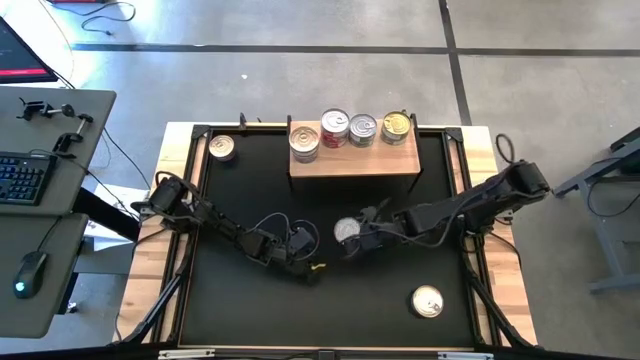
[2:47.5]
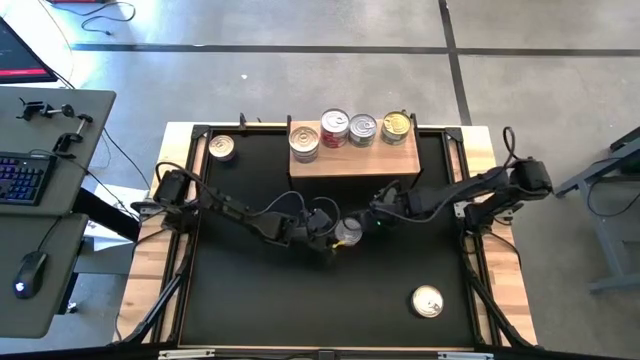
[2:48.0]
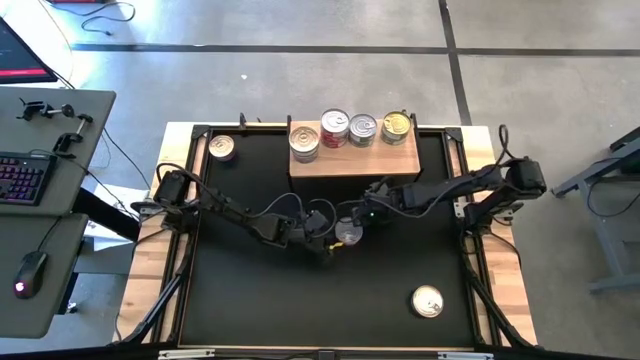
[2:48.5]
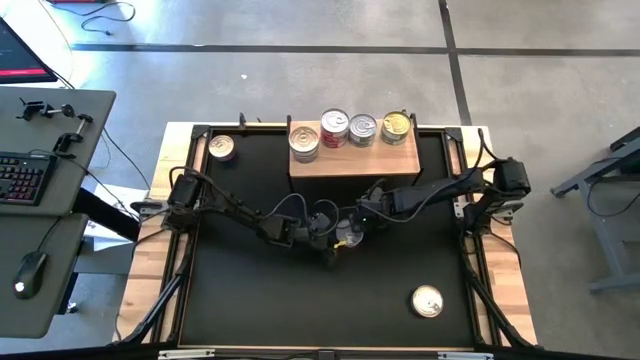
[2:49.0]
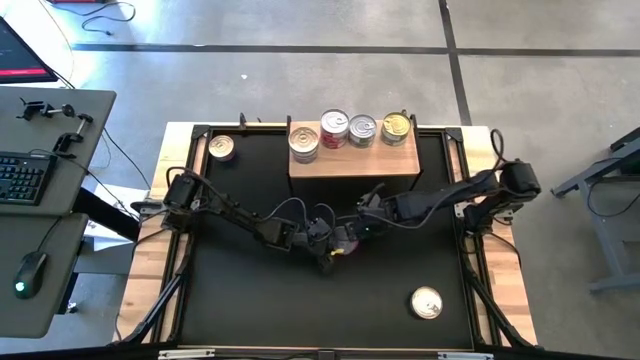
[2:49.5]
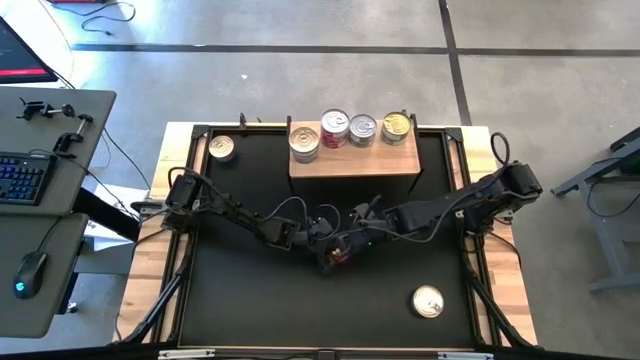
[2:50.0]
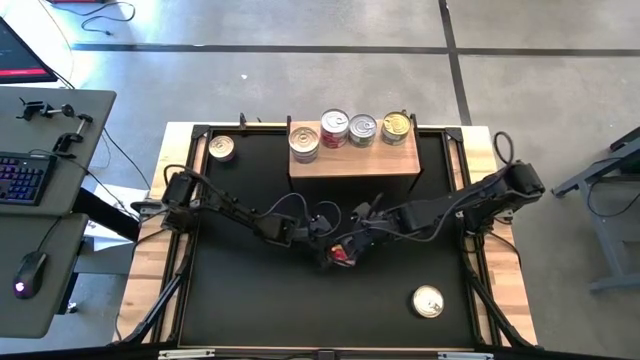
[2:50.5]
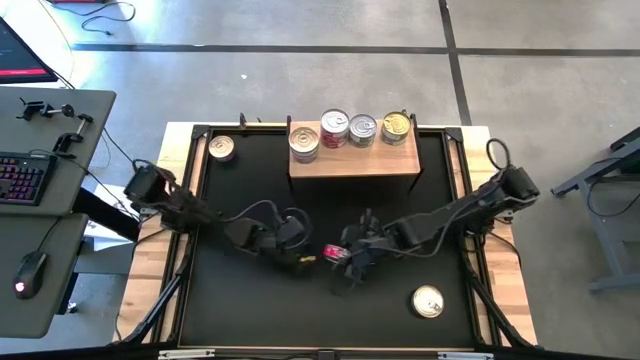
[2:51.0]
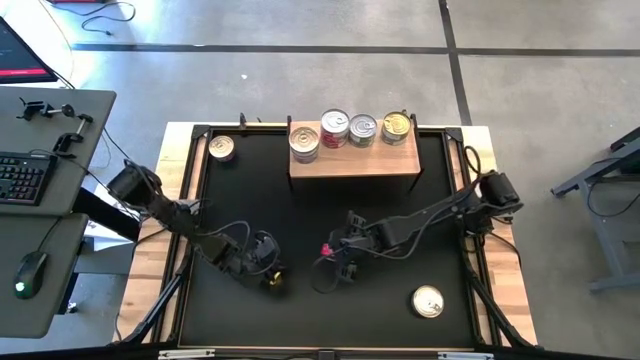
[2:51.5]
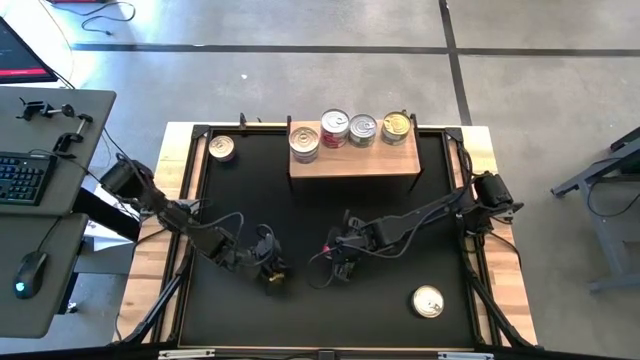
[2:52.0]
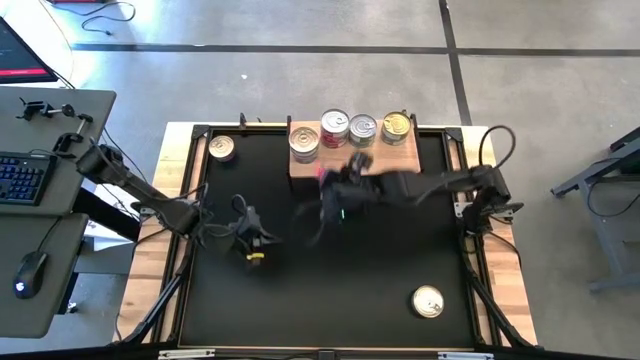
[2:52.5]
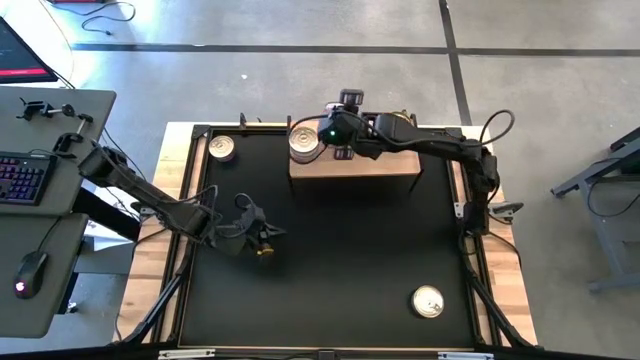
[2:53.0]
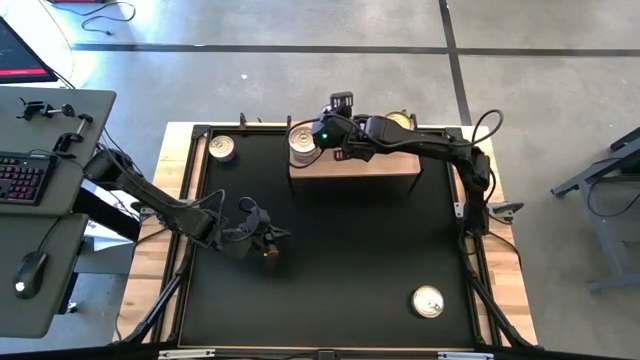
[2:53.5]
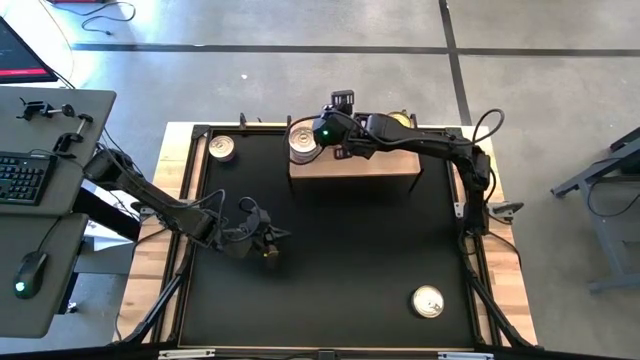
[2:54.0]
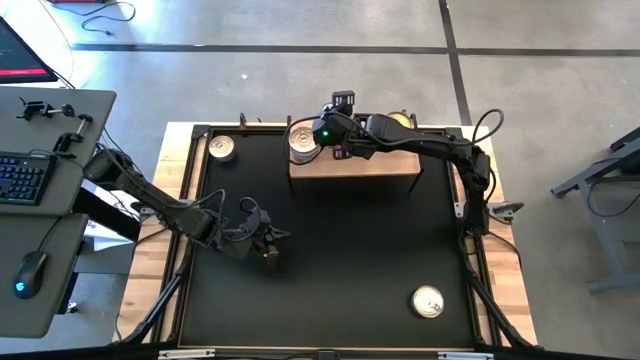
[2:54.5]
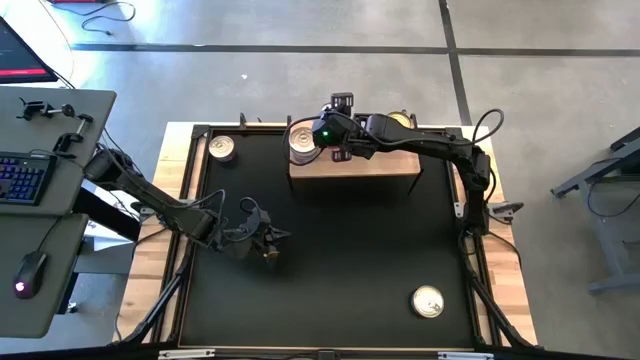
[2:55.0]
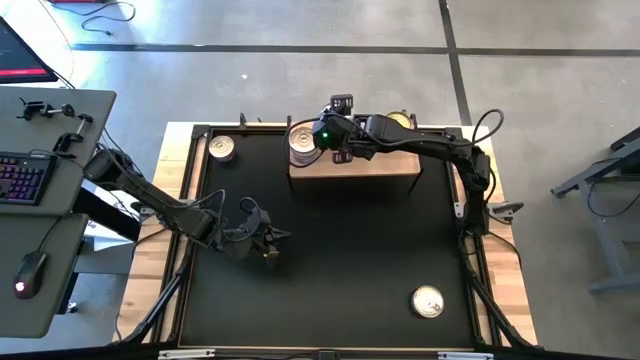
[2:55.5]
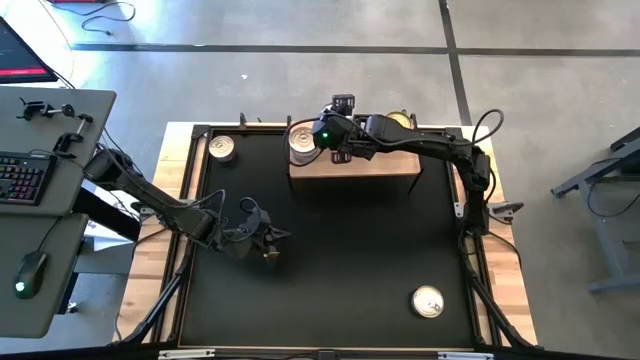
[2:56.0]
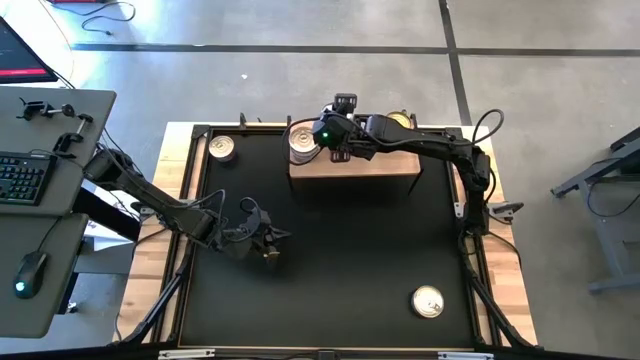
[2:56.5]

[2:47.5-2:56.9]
Task: Stack canned seafood by type on shelf
Stack the red tuna can on top of the red tuna can on the shelf

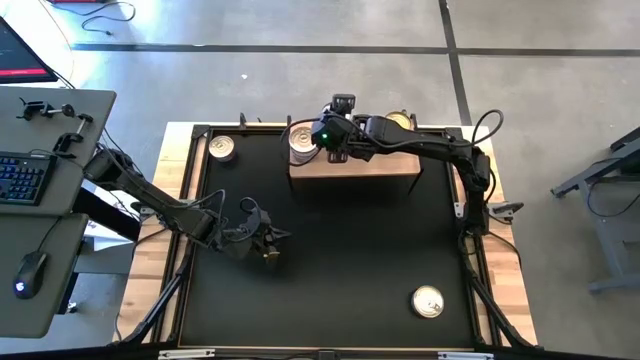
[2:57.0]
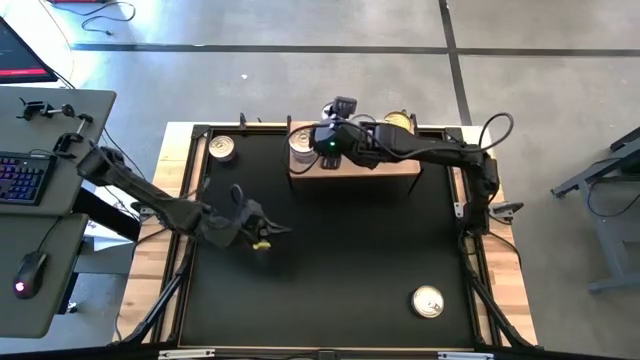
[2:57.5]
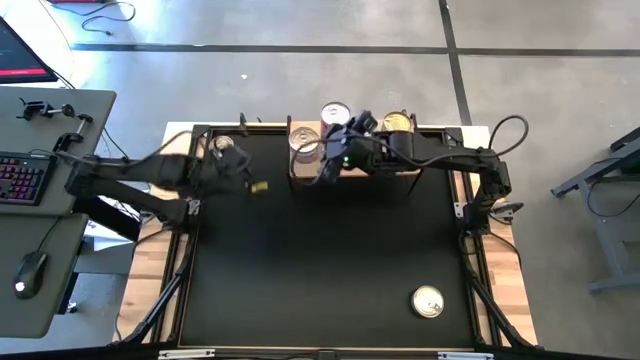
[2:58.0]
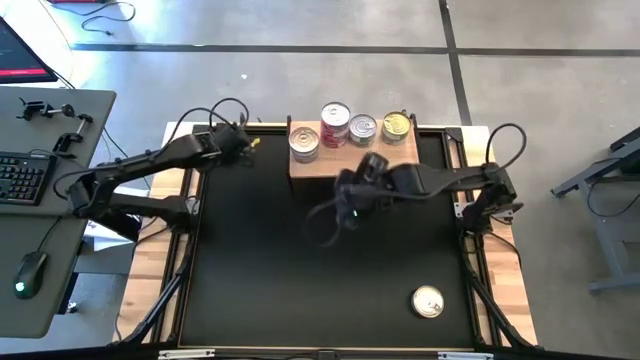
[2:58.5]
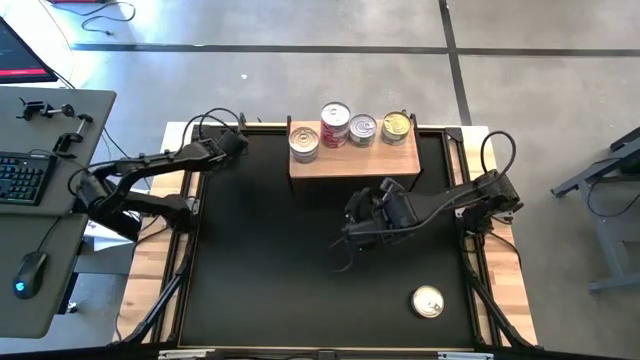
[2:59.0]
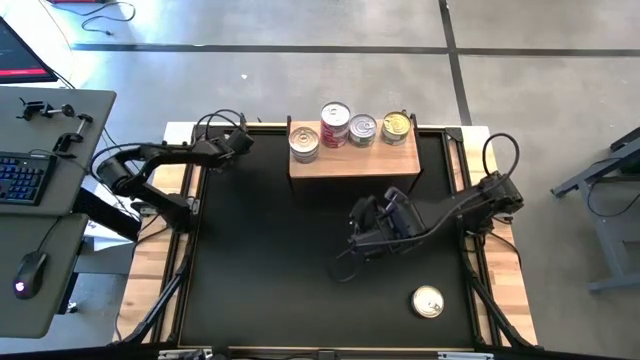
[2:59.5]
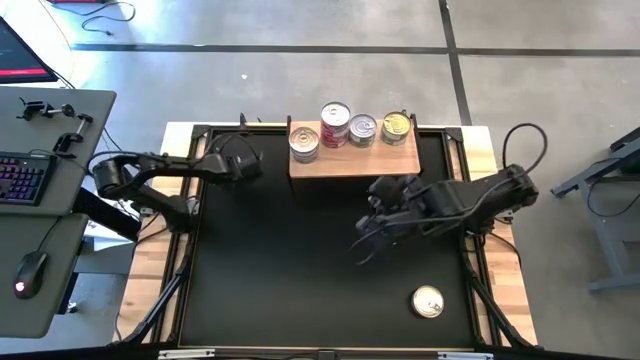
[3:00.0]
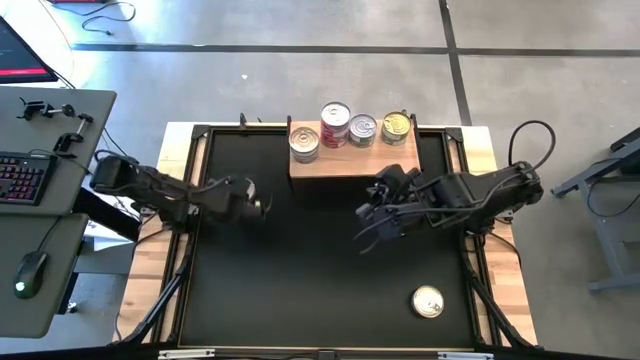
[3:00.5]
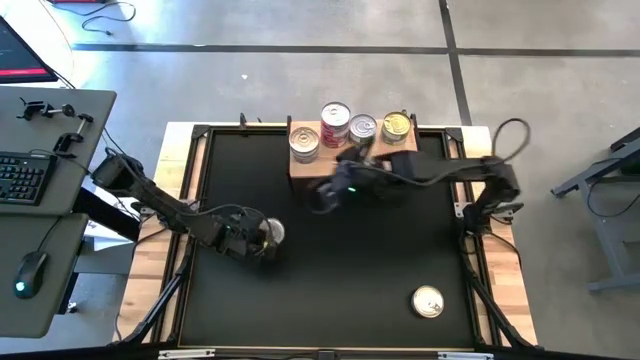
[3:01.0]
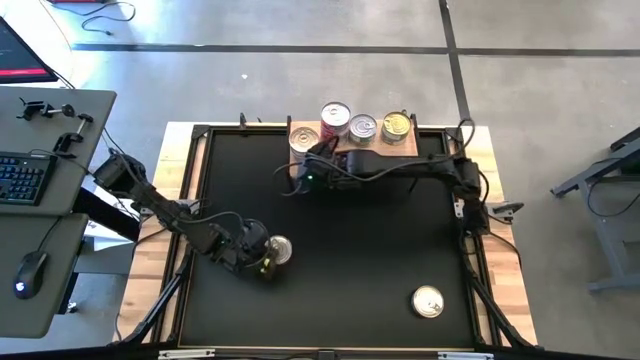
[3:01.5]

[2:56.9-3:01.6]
Move the blue-pink tuna can to the center of the table

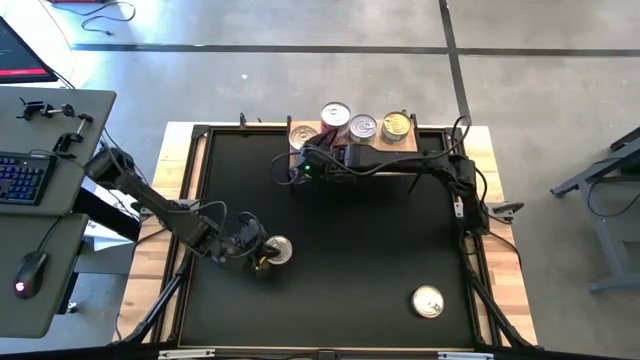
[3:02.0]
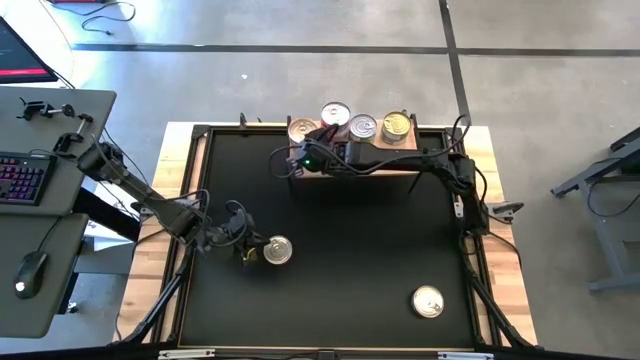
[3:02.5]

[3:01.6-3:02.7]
Adjust the blue-pink tuna cans on the shelf

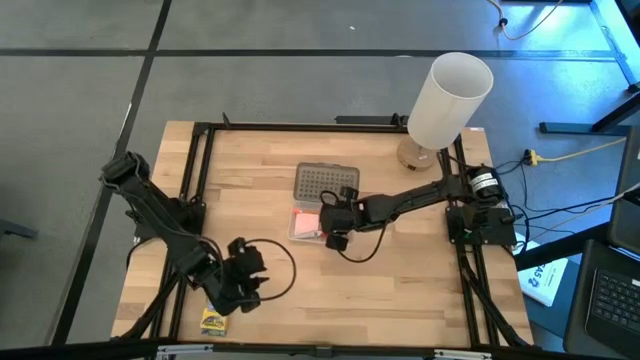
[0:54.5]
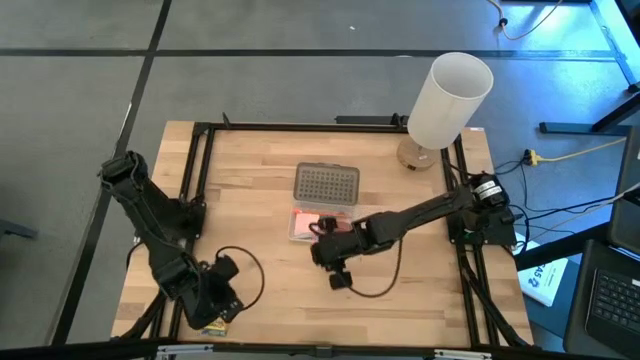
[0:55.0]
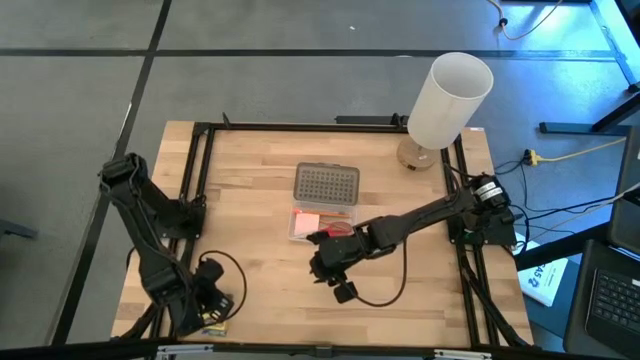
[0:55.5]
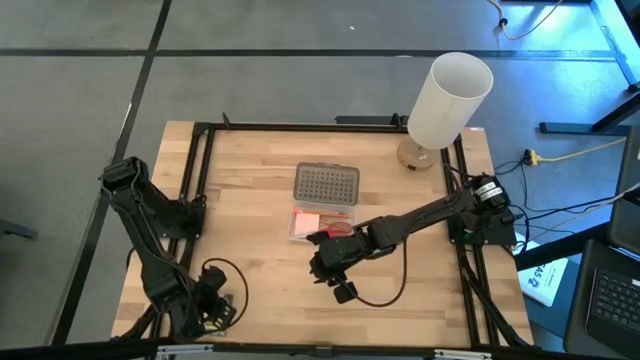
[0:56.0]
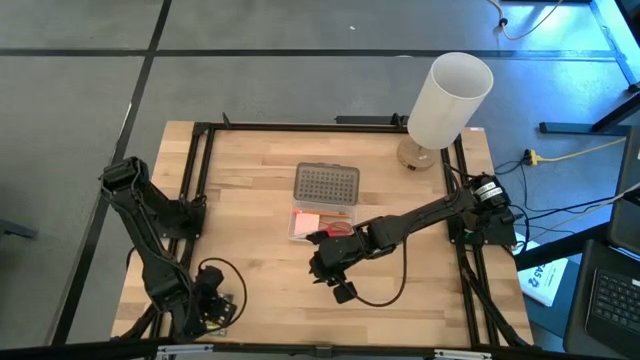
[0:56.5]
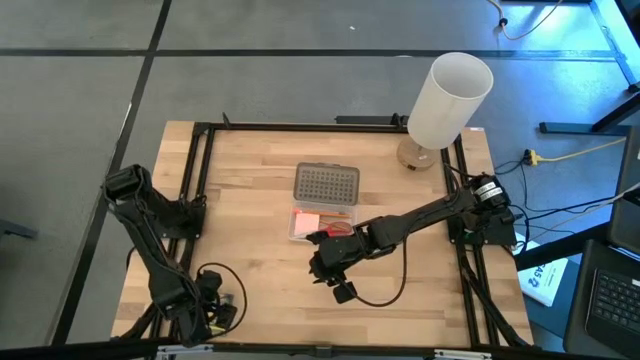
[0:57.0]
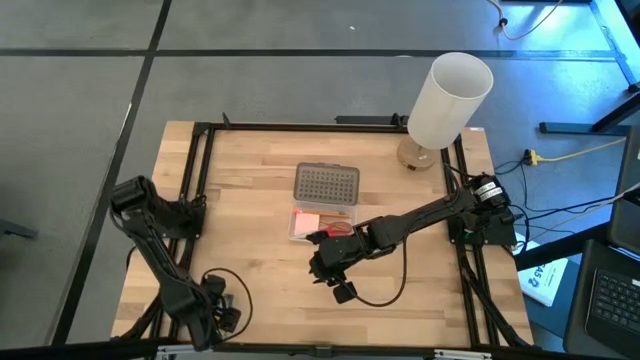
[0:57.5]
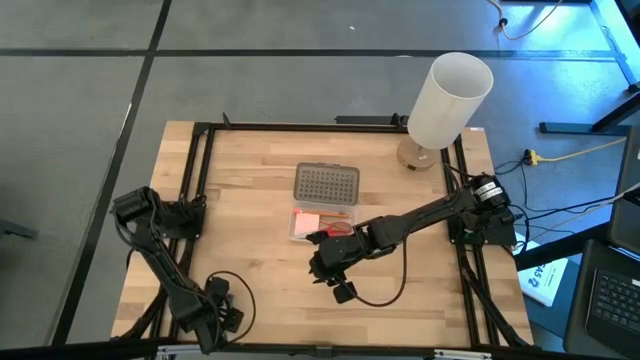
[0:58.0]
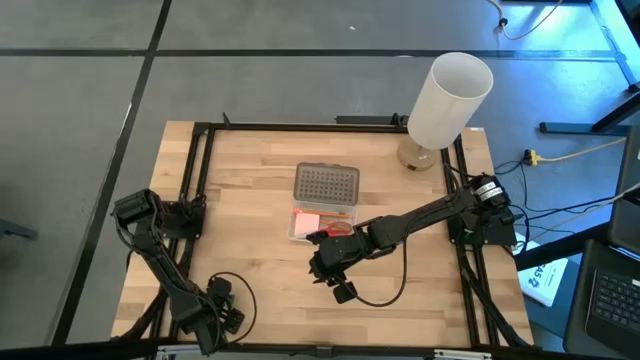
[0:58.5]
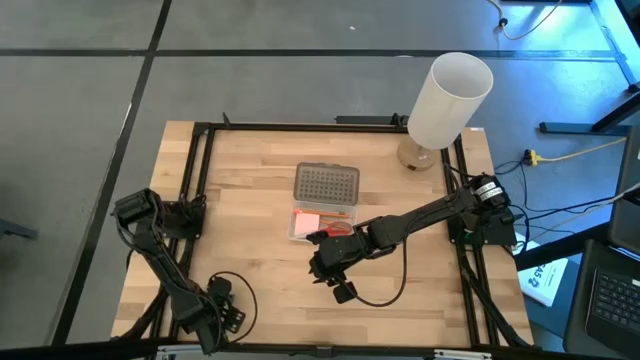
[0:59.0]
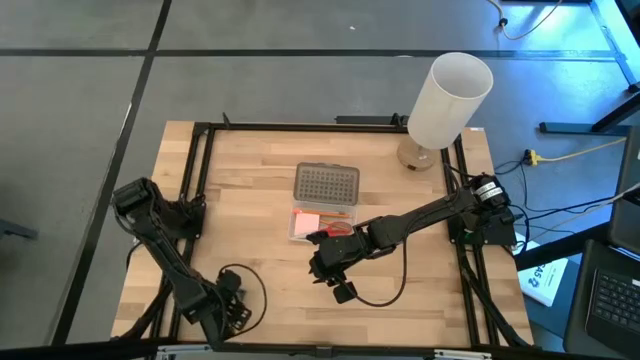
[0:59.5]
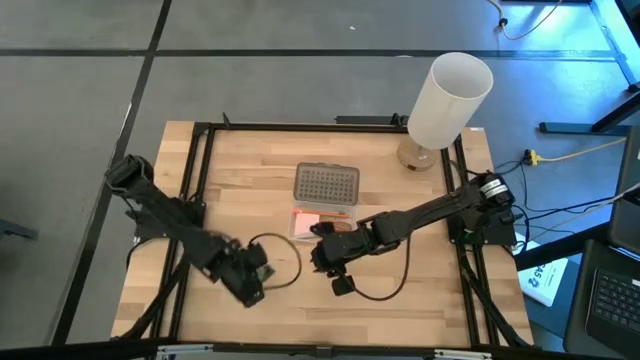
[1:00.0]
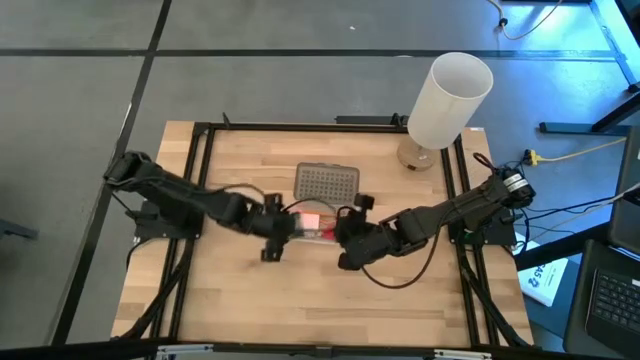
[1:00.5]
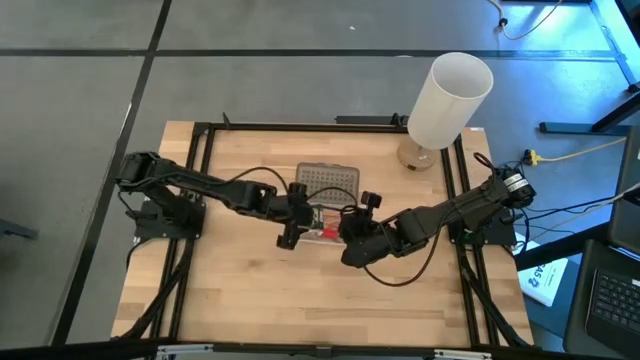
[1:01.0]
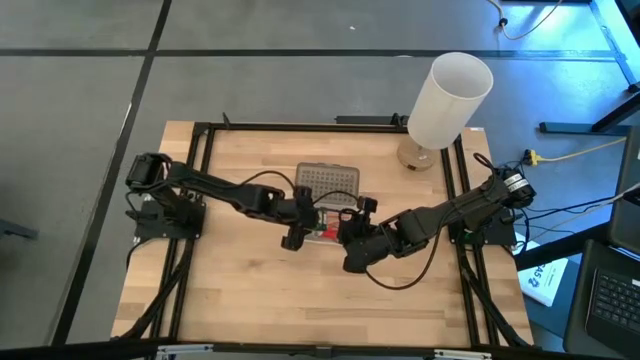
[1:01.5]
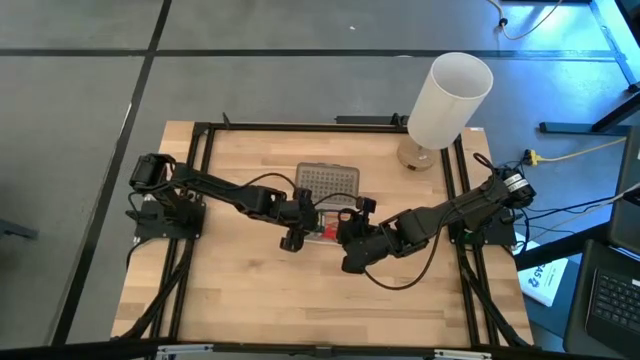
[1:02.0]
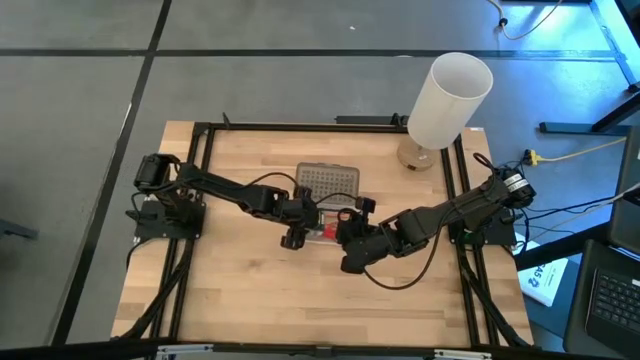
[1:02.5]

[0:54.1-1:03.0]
Task: Pack school essentials
Put the yellow crayon box into the supply box
